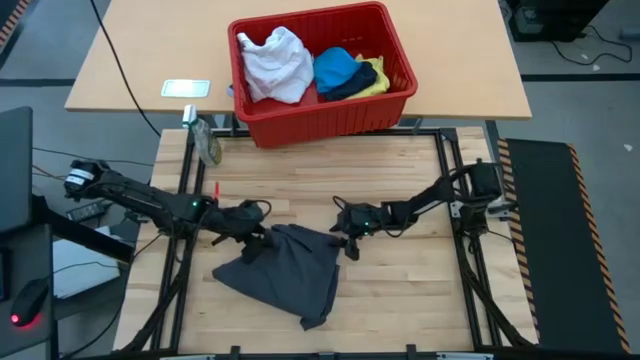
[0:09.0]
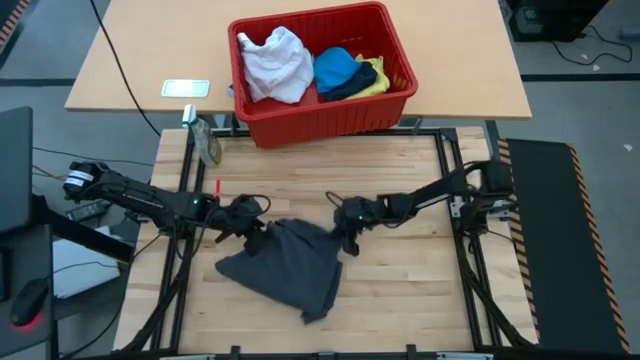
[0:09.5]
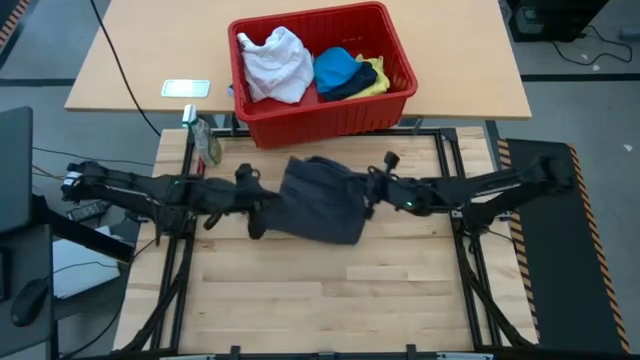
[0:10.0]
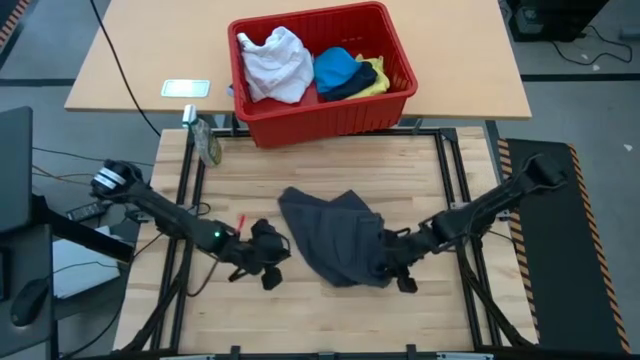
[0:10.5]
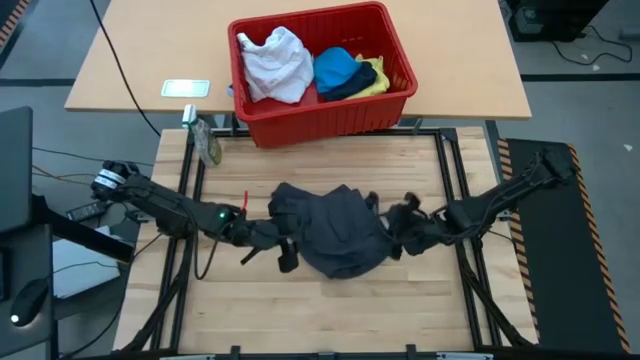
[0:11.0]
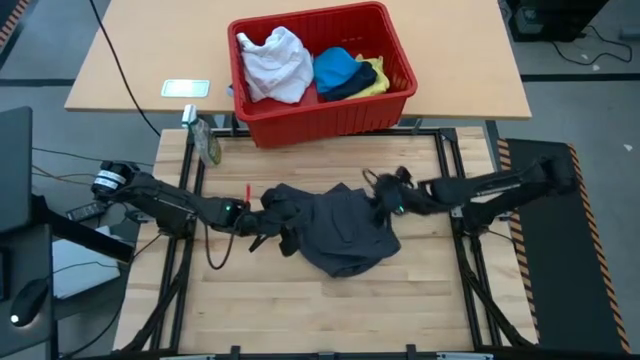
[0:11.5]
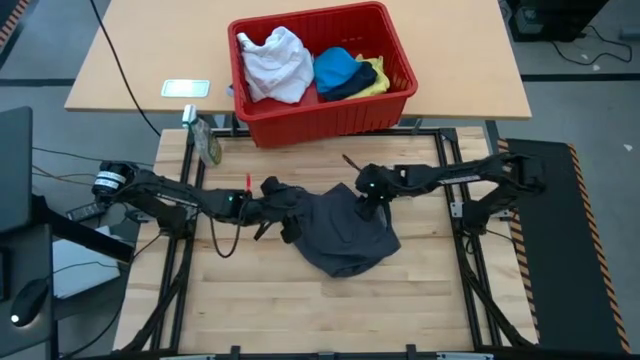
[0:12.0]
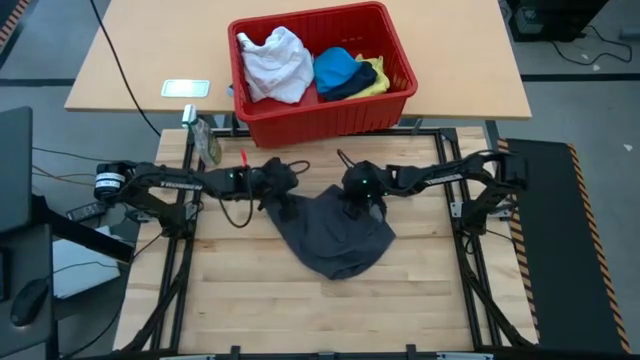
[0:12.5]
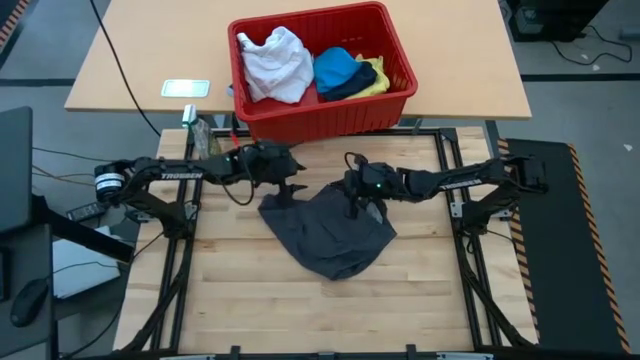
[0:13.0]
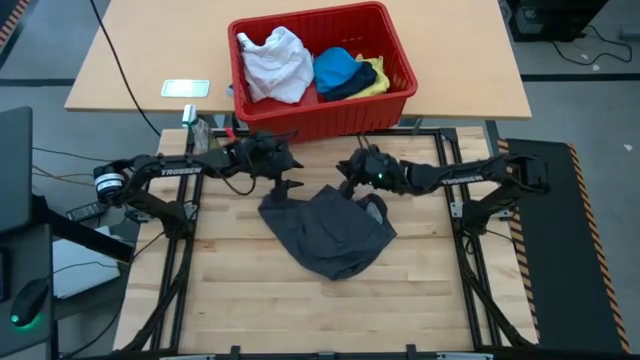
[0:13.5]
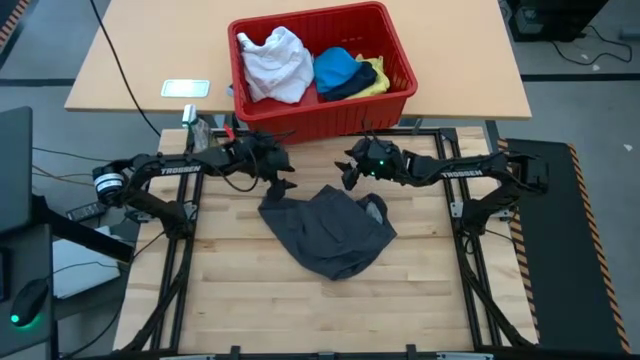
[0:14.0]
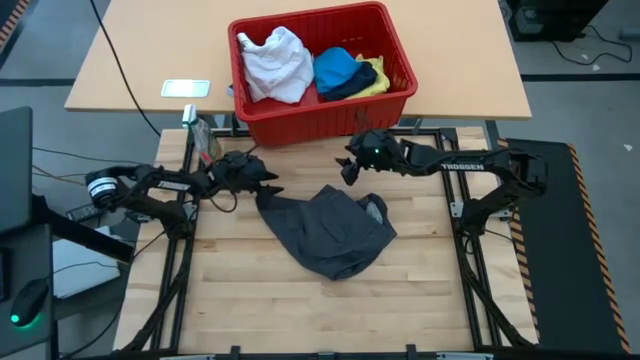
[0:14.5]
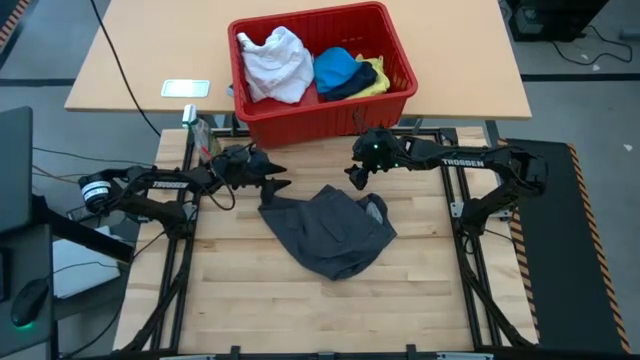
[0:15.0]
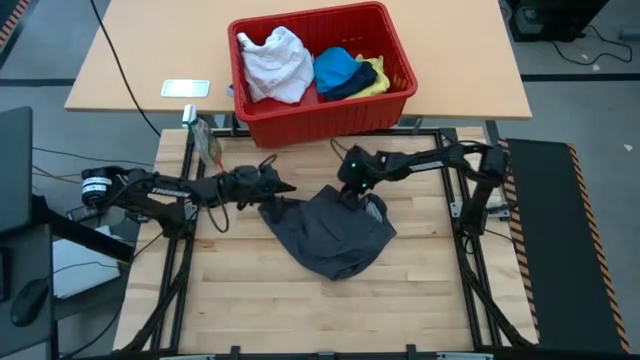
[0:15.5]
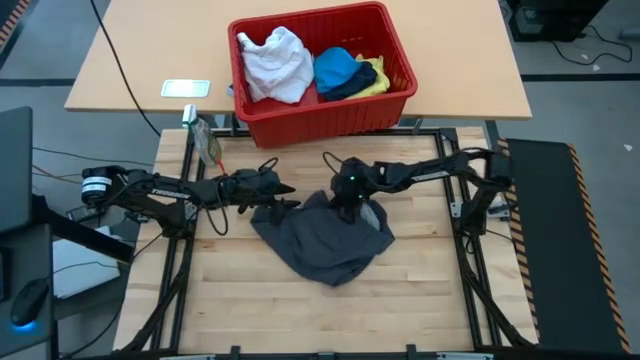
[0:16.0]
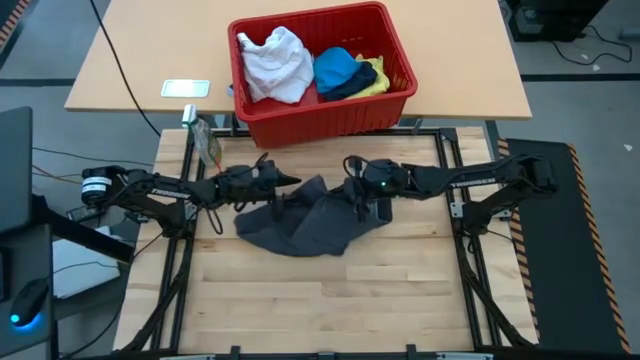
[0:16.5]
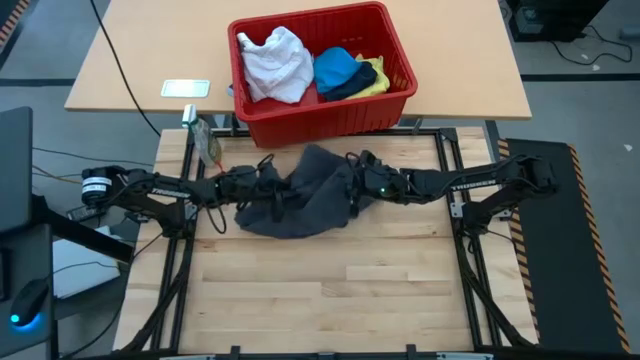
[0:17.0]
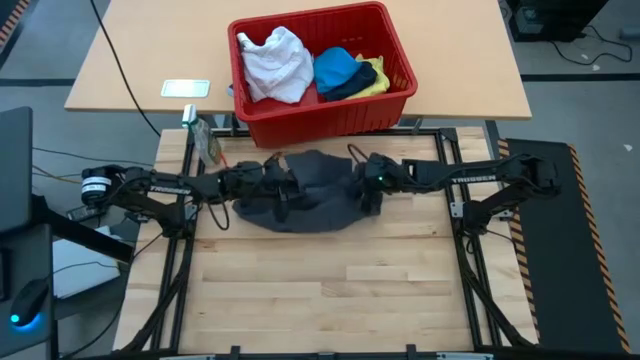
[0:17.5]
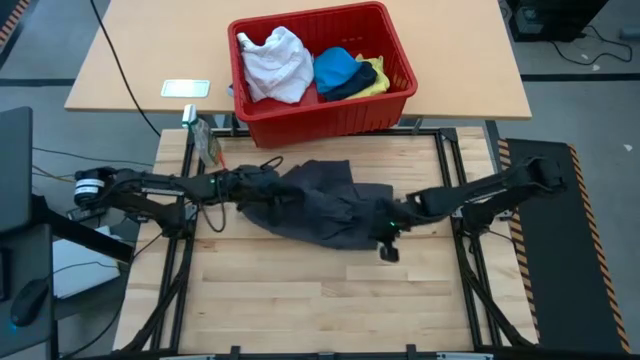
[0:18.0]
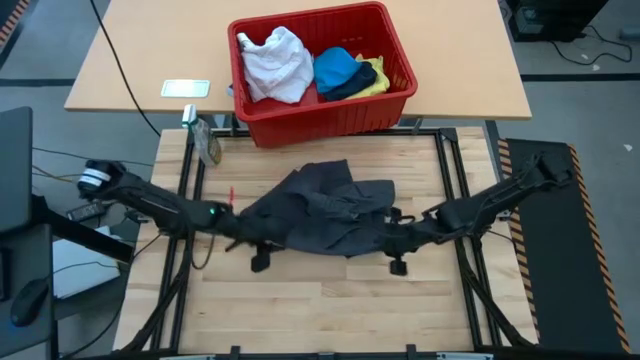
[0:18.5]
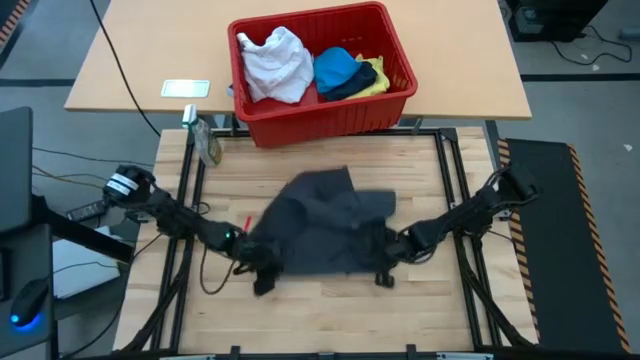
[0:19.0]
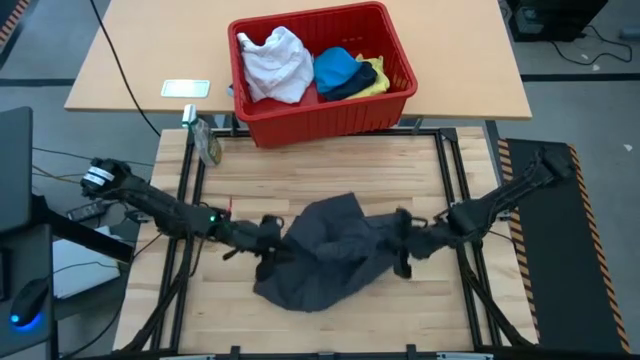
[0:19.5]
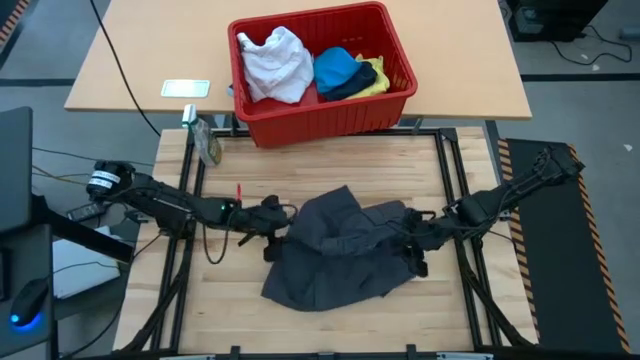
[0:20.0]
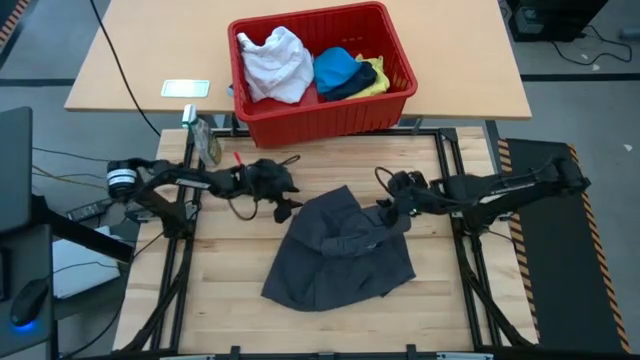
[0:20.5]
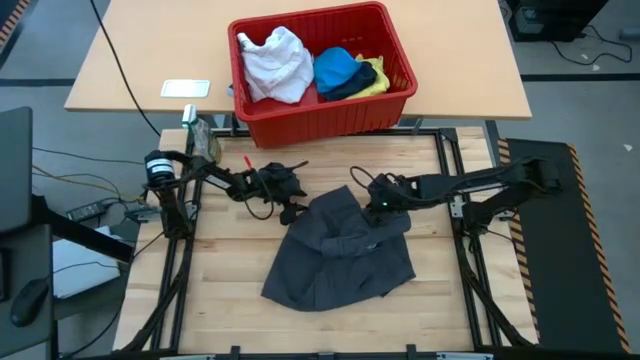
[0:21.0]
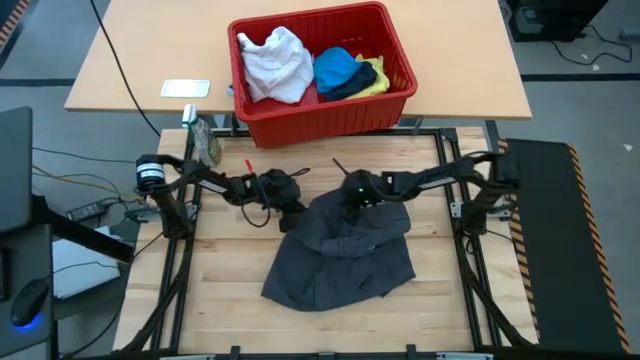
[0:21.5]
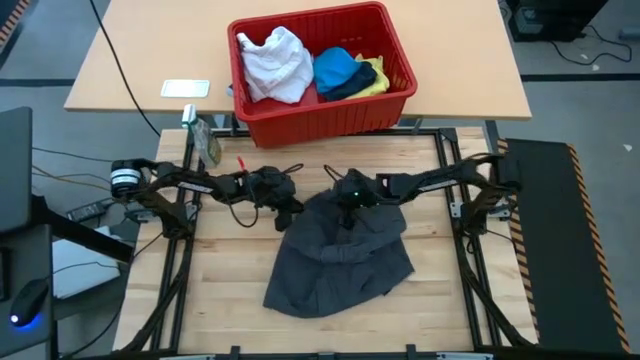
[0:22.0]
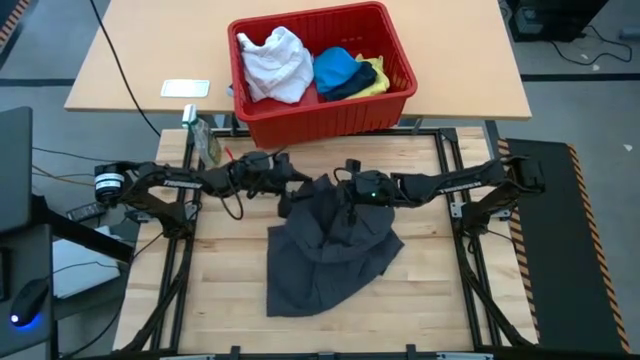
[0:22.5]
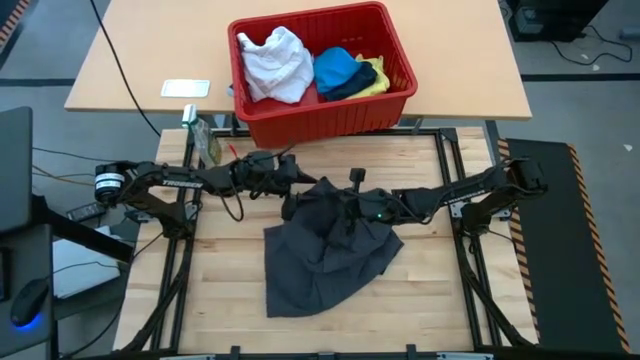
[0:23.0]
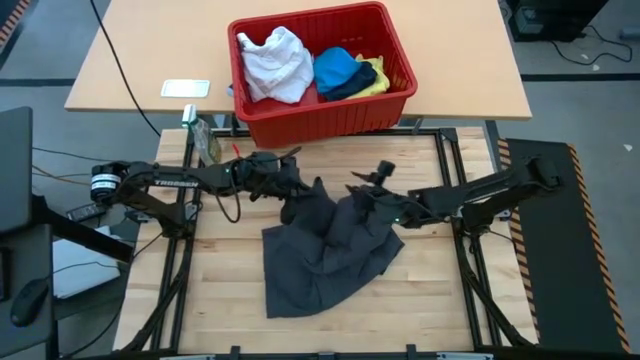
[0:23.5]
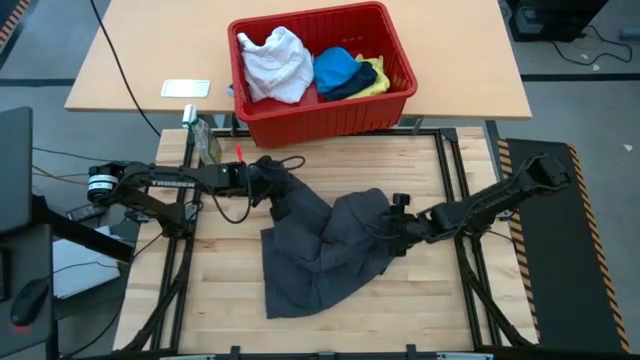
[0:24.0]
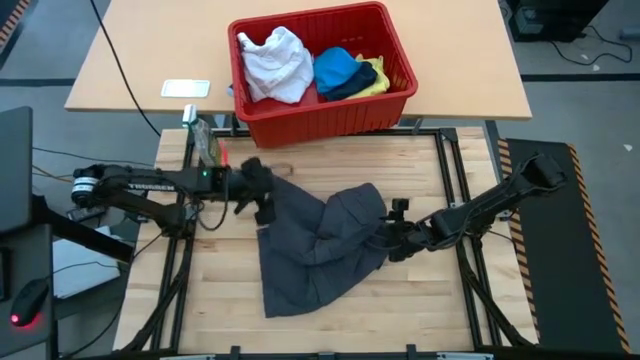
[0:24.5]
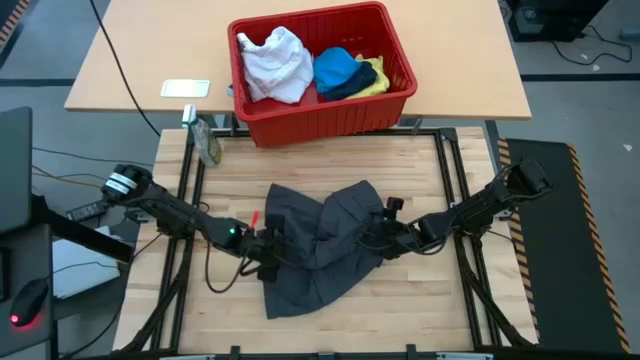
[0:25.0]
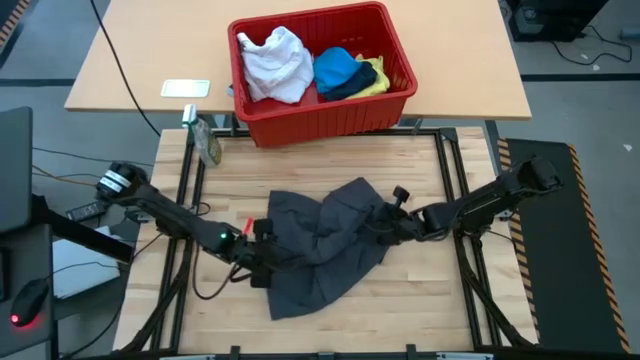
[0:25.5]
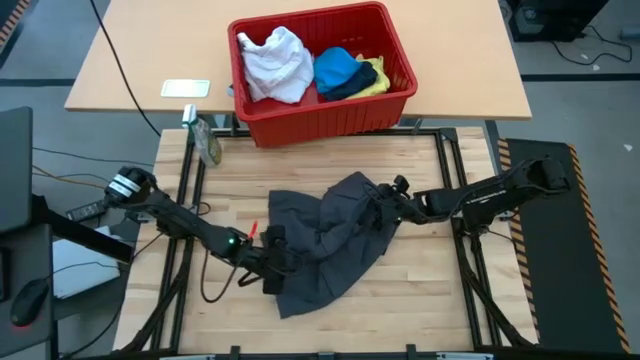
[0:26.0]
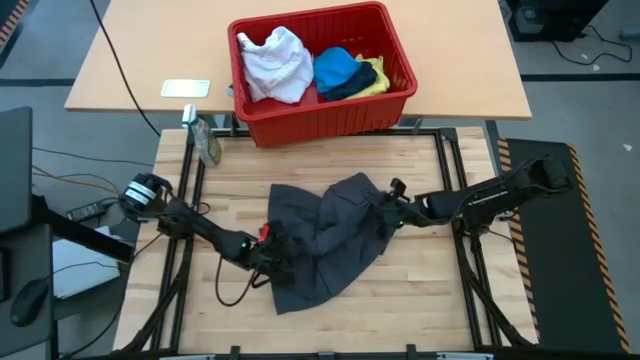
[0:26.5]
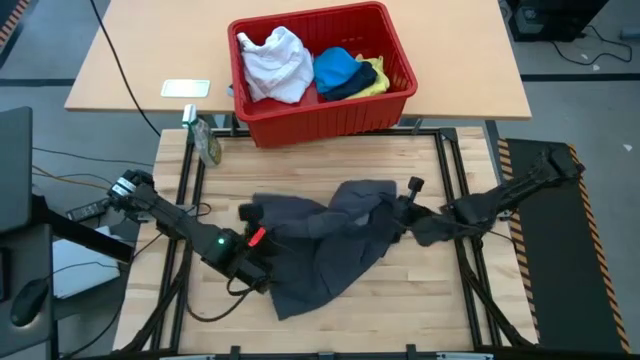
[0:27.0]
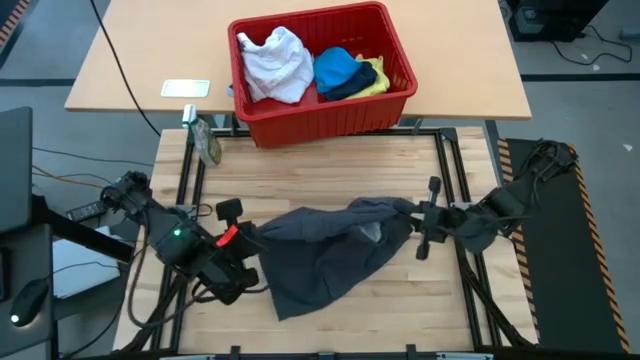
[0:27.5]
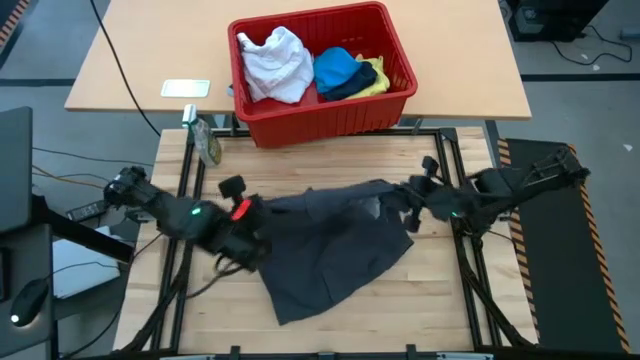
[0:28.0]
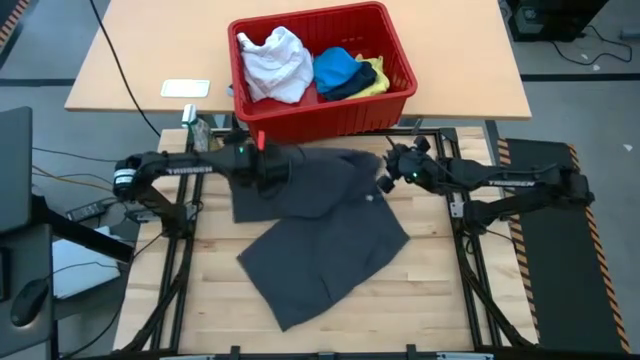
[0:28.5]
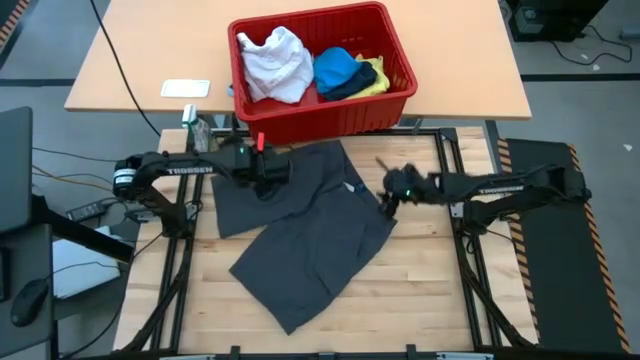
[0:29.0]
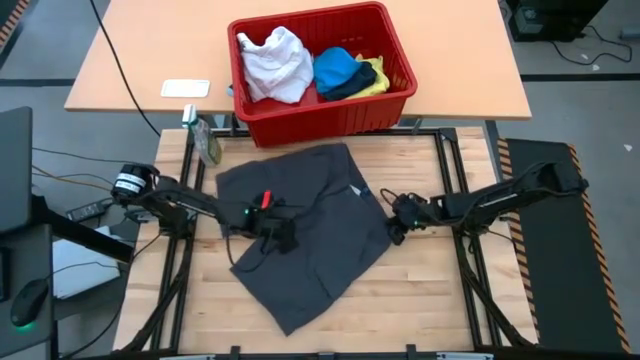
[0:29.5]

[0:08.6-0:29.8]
Task: Fold laundry
Fold the black shorts
